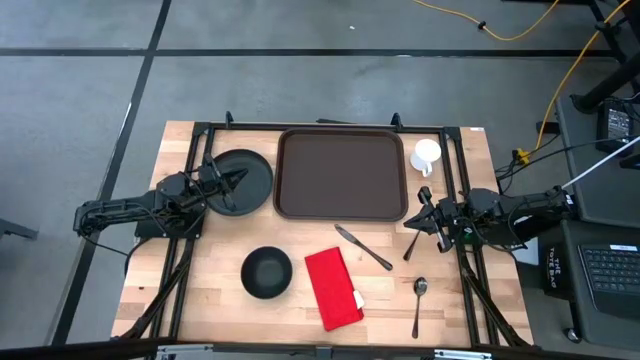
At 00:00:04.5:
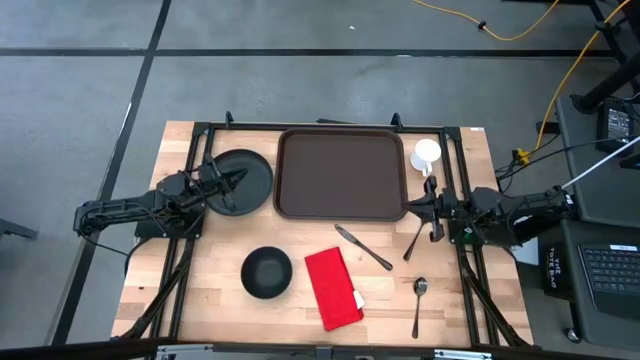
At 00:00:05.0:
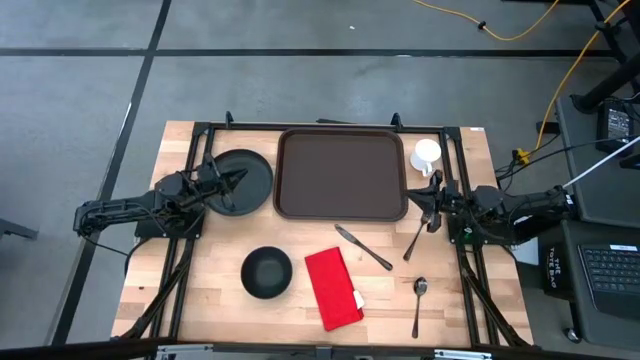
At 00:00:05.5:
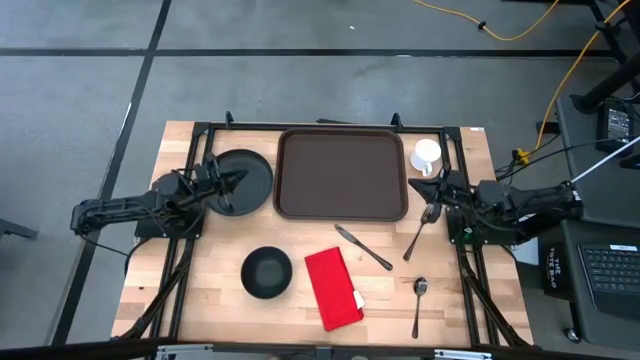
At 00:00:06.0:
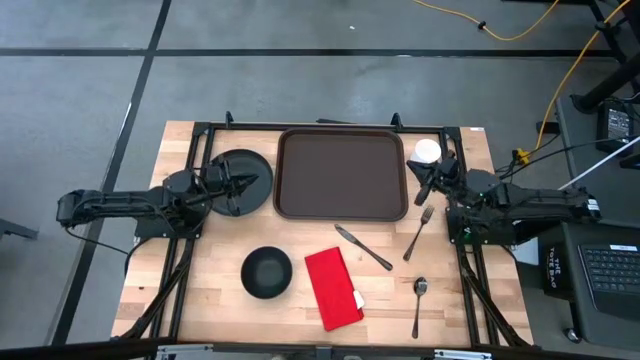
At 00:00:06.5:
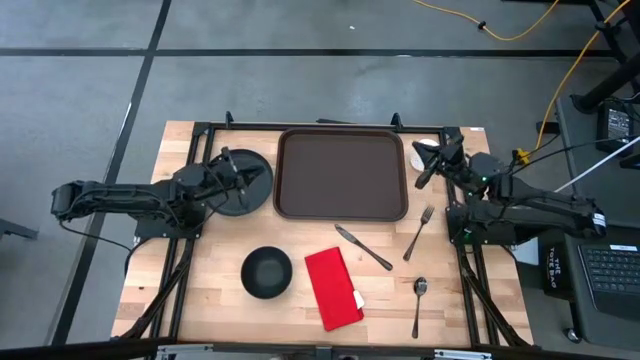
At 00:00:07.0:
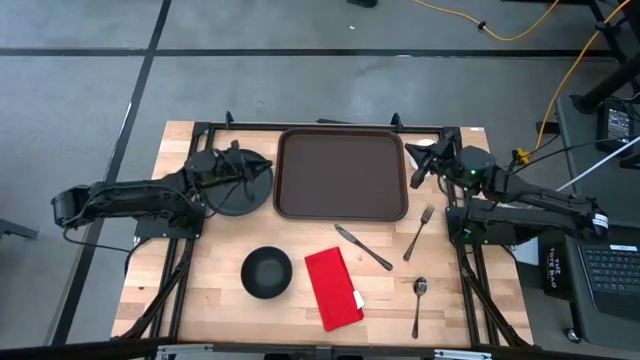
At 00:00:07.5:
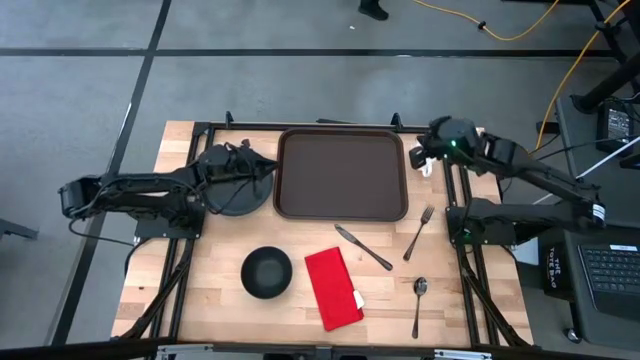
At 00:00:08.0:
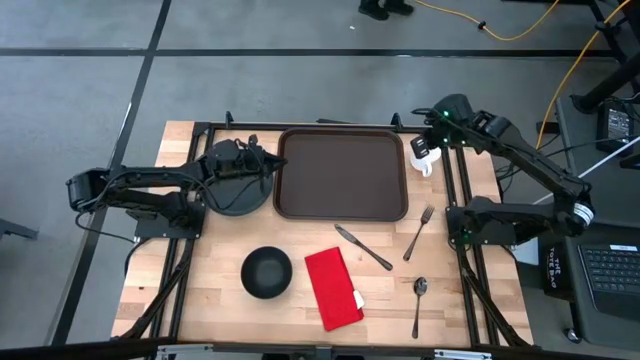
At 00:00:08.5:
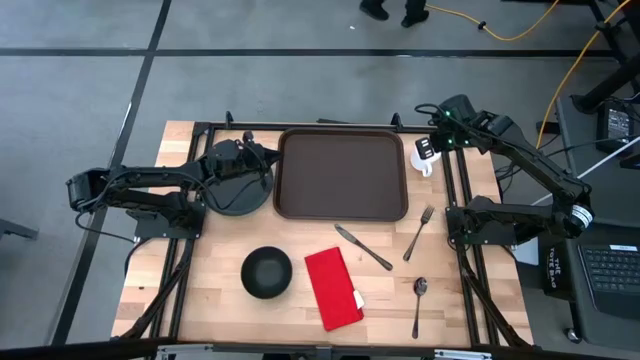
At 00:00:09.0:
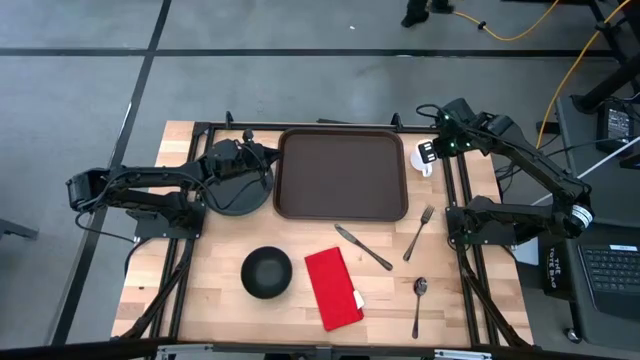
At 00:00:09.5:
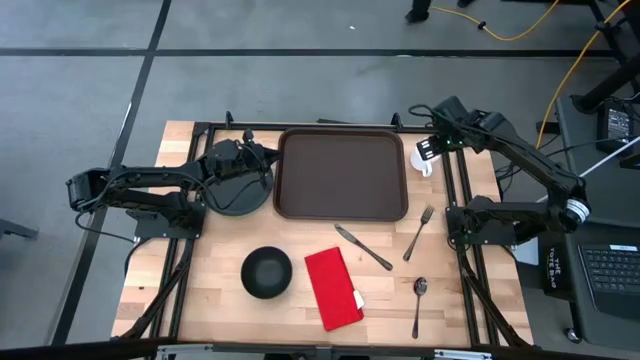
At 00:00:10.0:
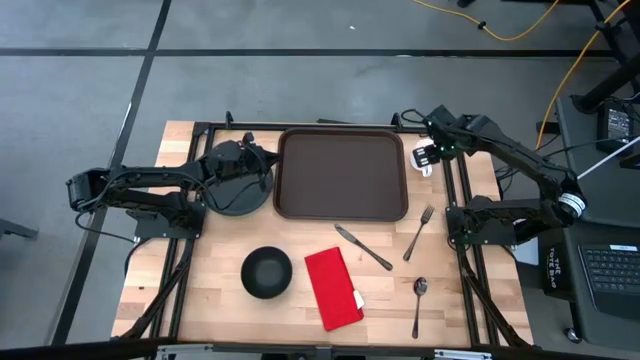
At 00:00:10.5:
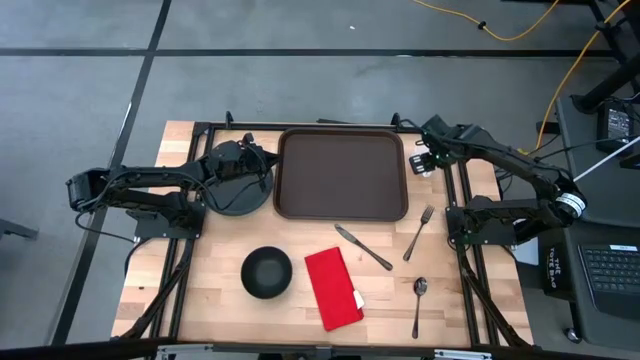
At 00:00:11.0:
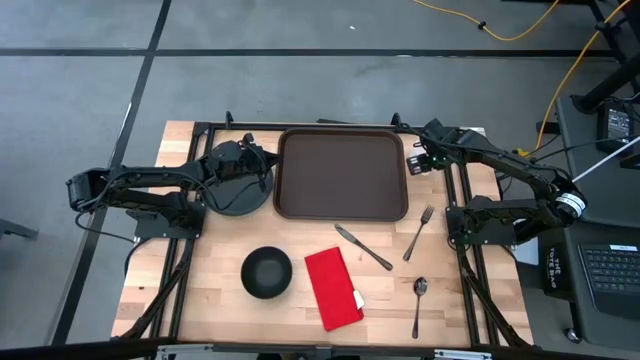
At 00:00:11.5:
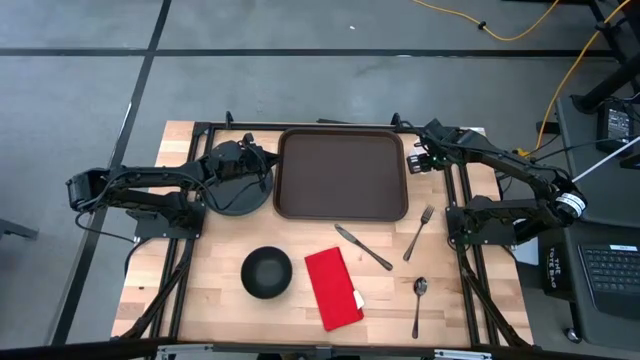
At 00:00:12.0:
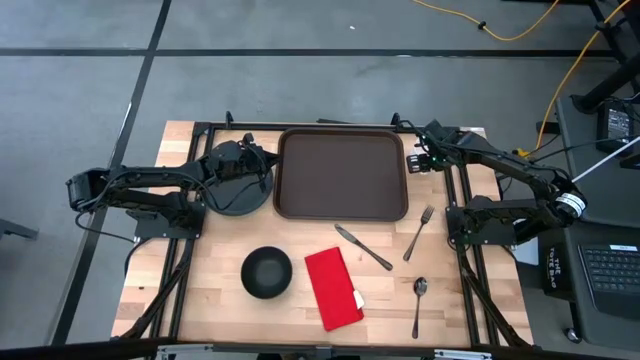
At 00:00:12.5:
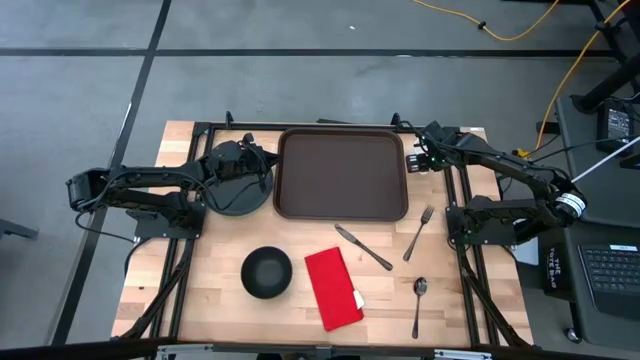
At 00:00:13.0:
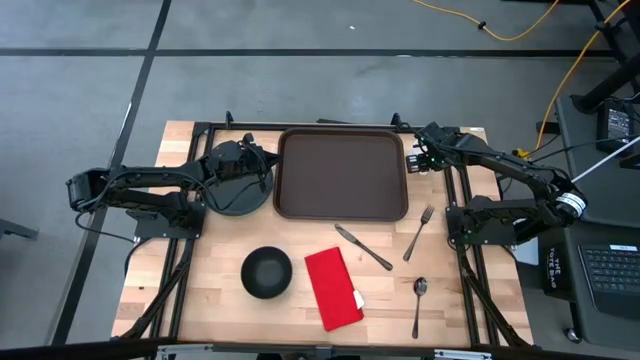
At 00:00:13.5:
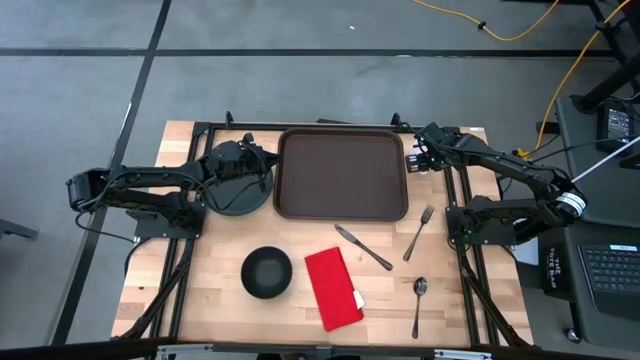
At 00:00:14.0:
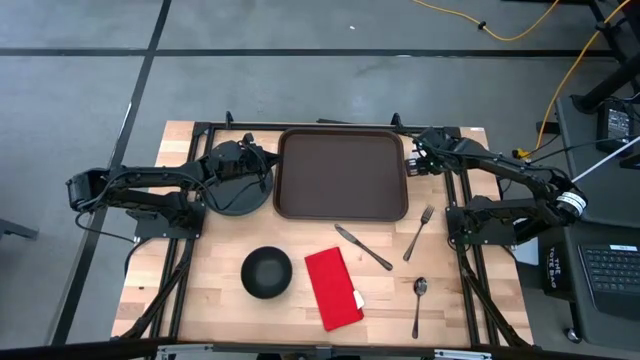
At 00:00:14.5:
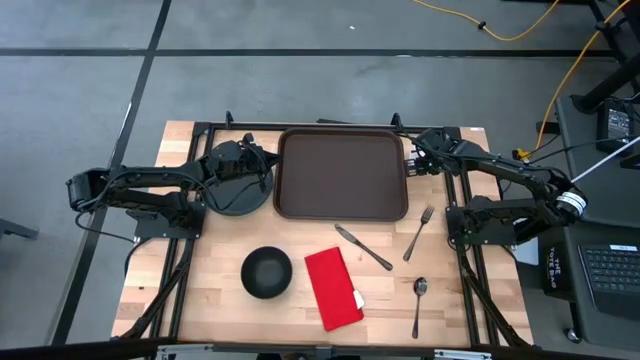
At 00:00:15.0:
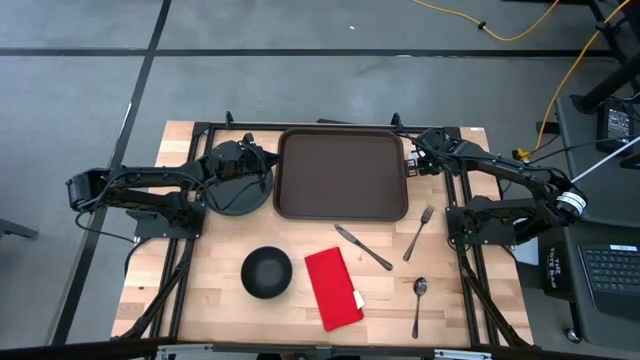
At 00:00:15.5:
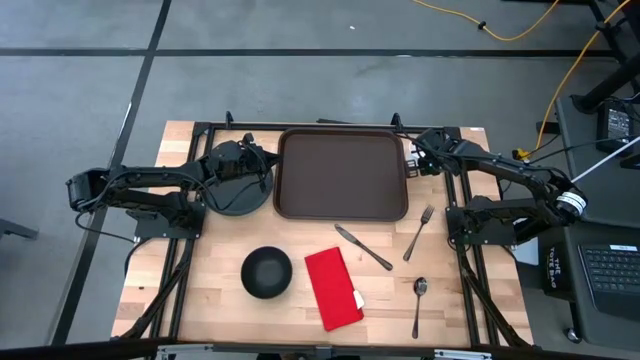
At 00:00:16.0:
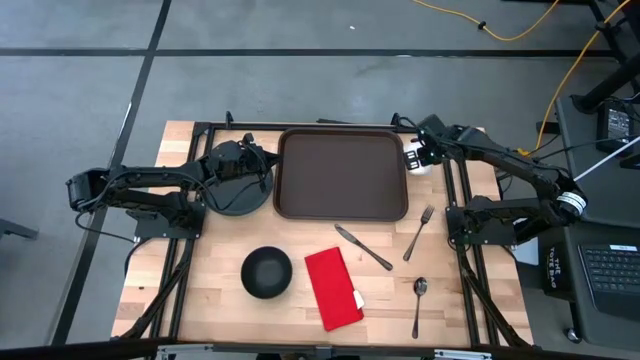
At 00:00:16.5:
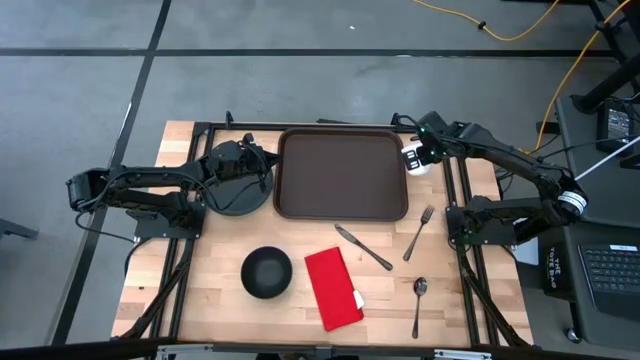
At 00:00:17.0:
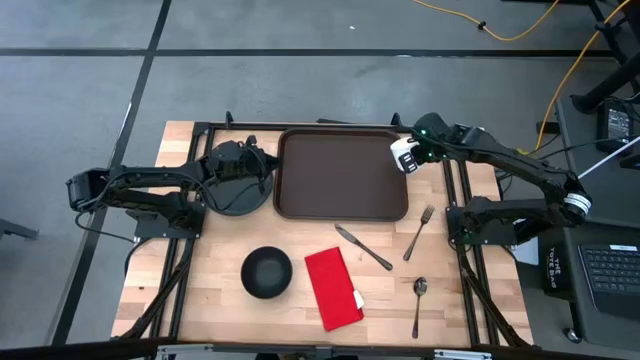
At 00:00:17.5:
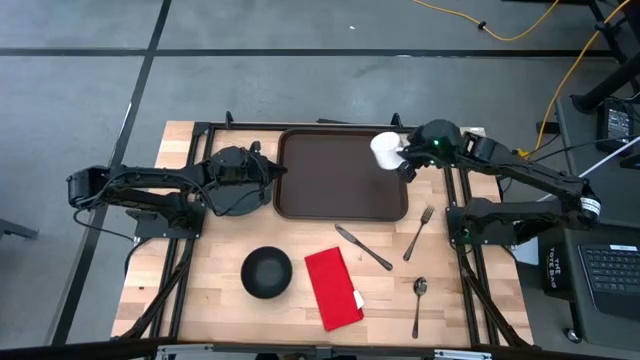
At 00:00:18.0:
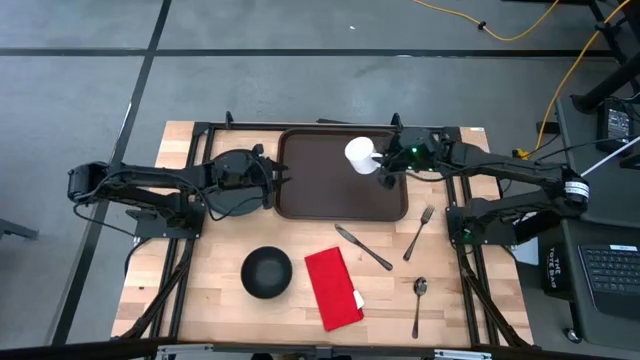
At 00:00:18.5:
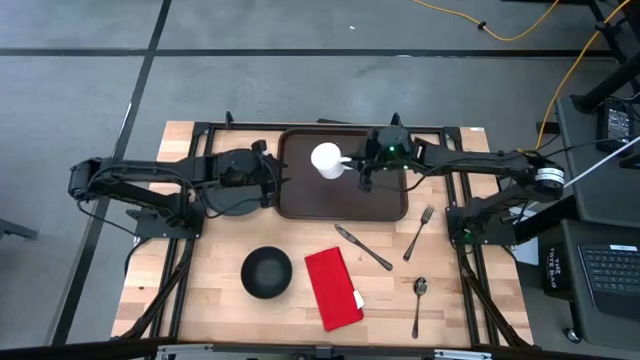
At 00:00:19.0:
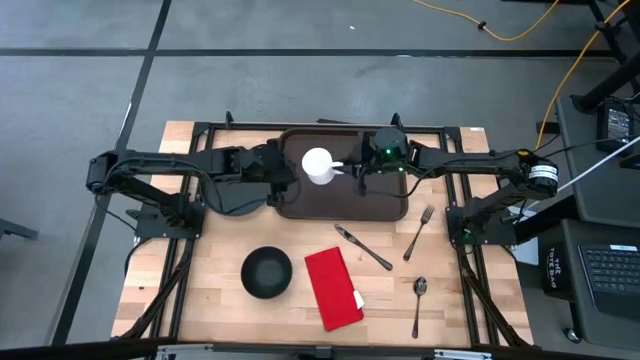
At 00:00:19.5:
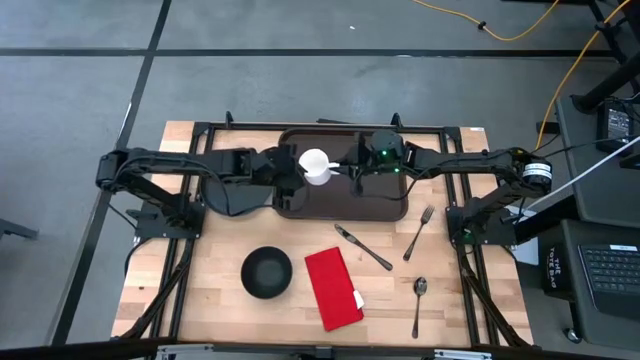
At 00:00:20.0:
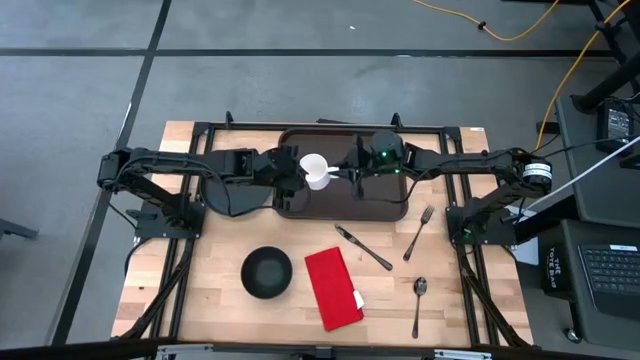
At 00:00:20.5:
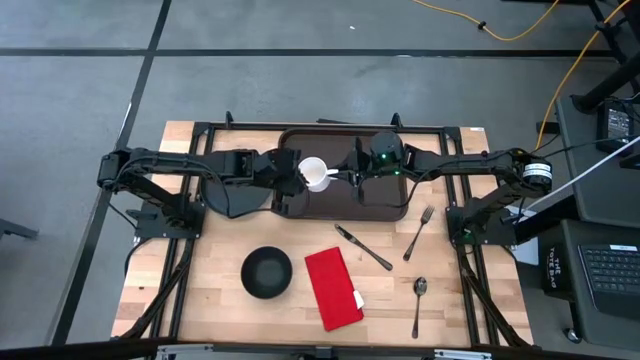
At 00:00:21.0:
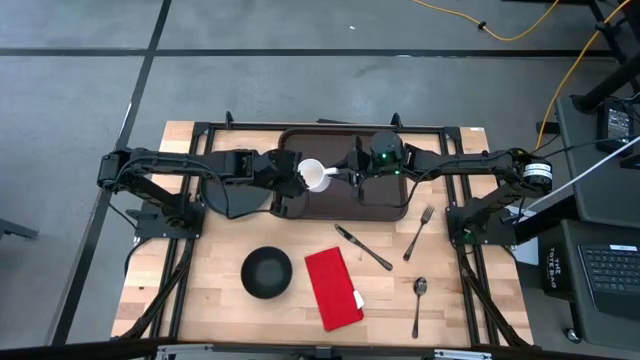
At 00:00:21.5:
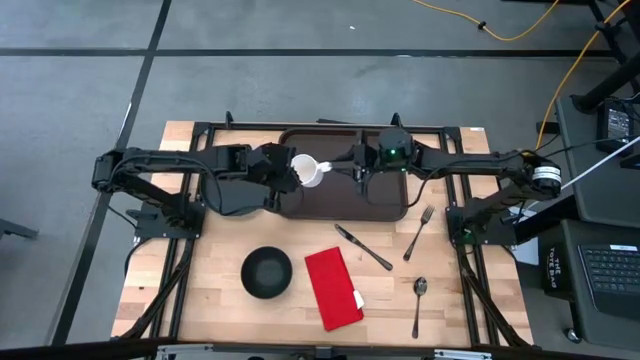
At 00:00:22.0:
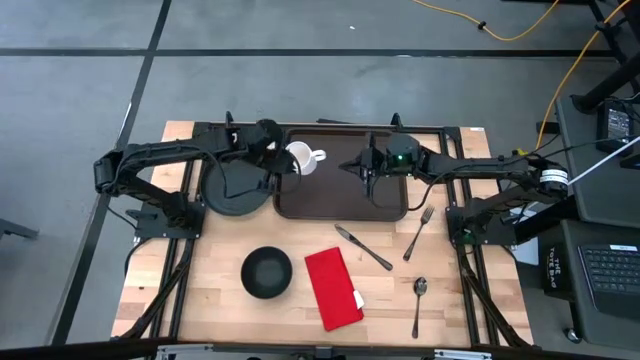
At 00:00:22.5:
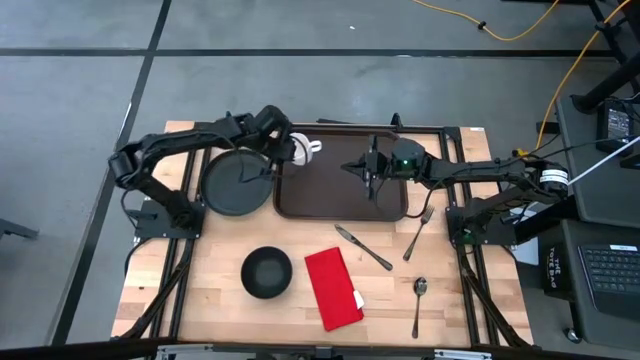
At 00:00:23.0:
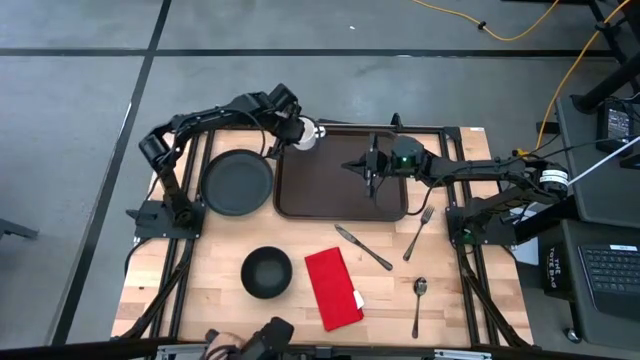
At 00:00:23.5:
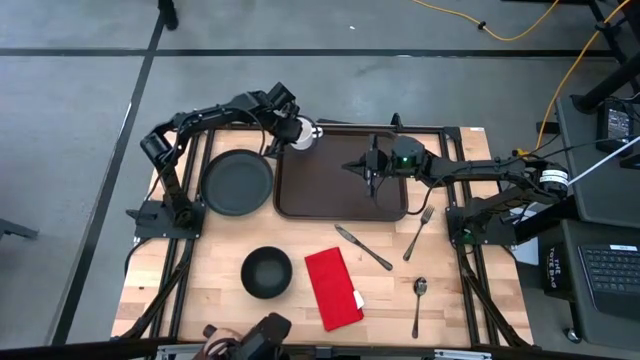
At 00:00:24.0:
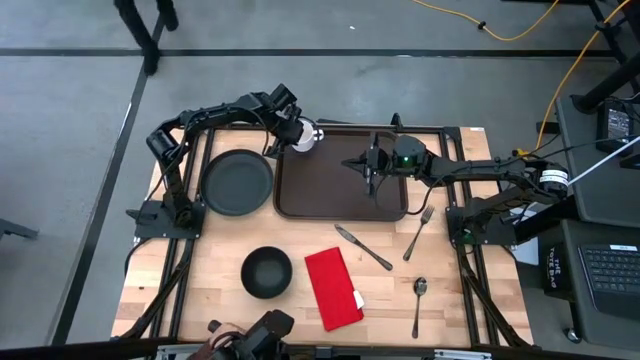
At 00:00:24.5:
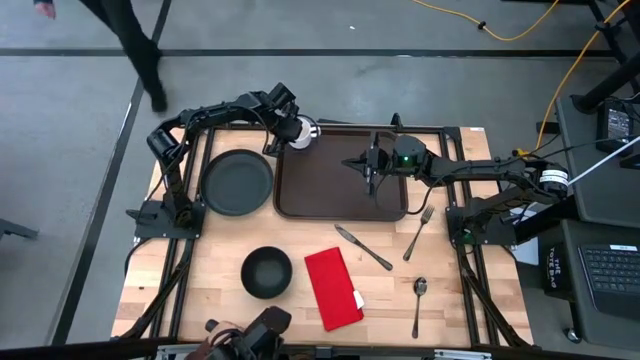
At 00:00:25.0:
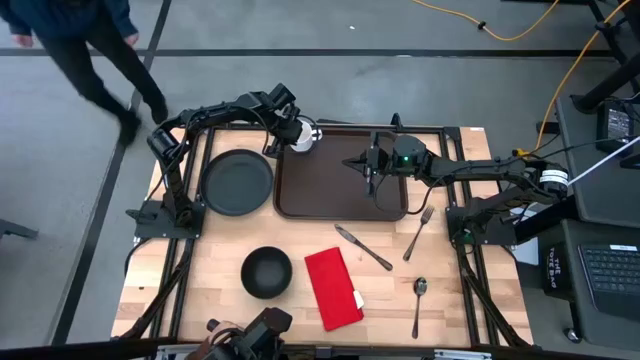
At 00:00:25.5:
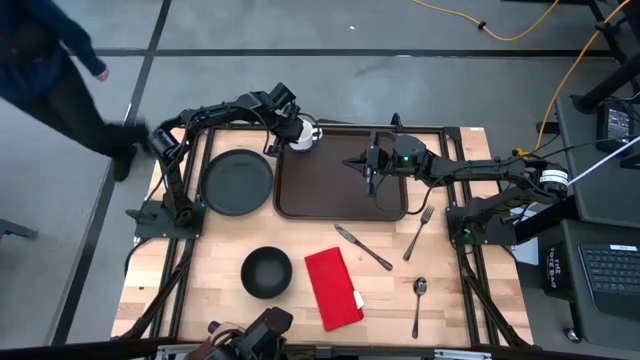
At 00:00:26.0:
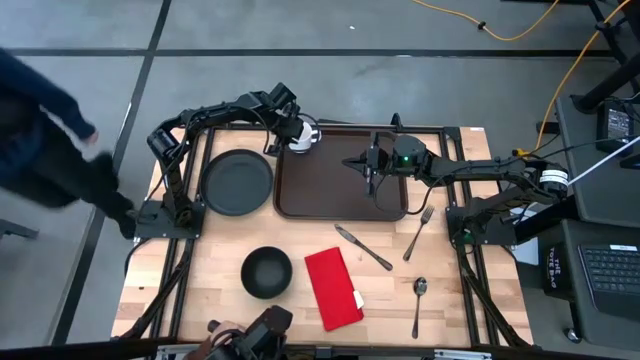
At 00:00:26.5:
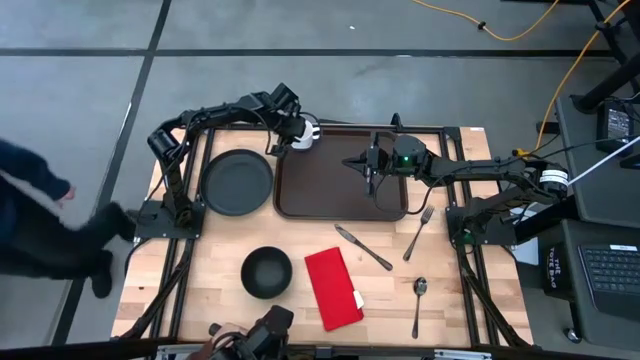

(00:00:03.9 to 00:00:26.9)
Task: Set up tray
Put the white mug on the top left corner of the brown serving tray
